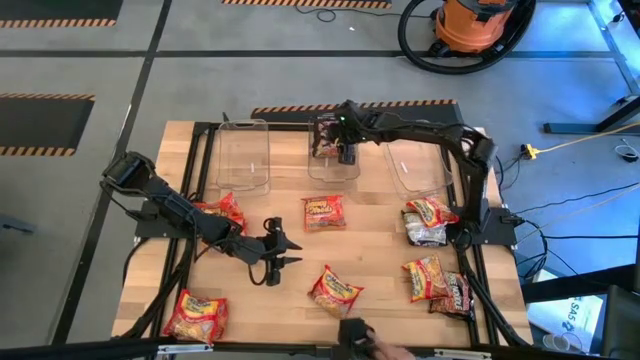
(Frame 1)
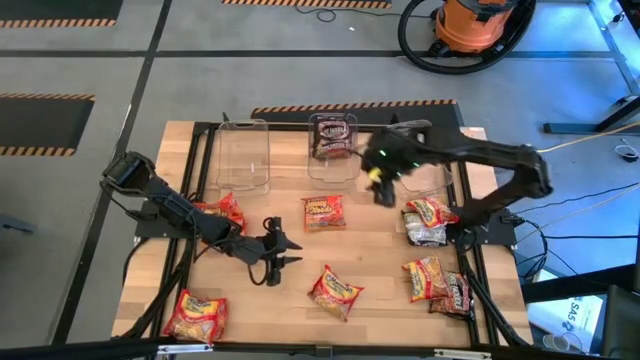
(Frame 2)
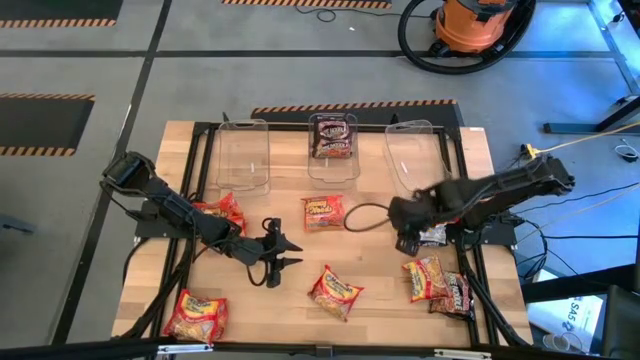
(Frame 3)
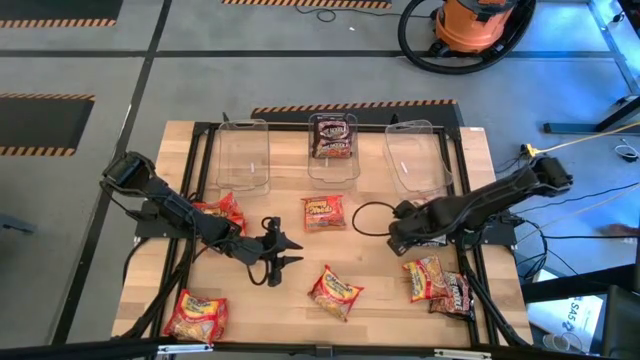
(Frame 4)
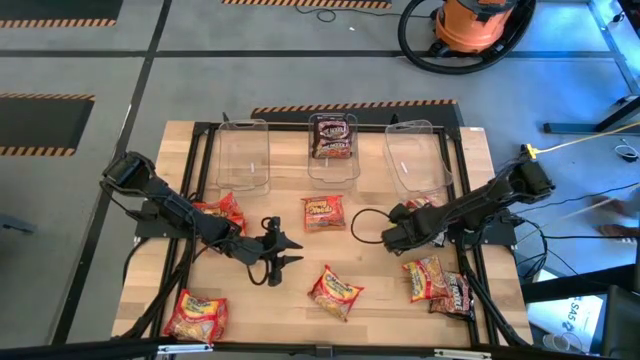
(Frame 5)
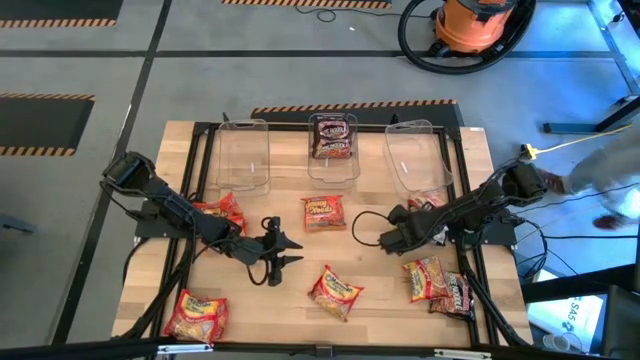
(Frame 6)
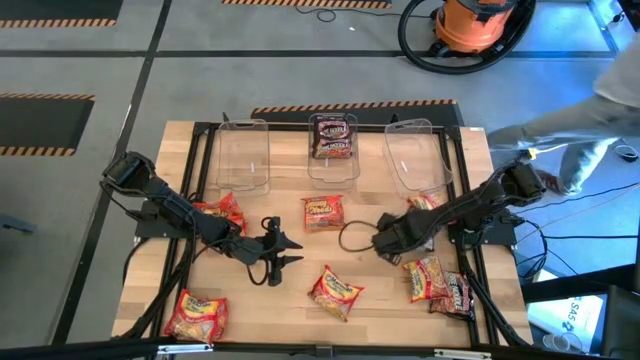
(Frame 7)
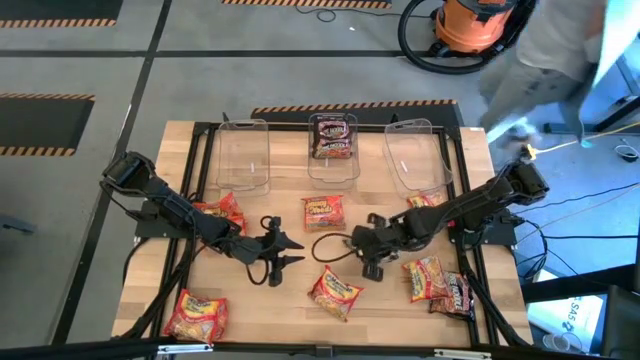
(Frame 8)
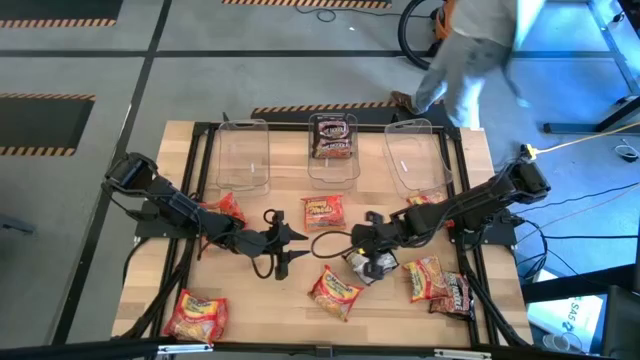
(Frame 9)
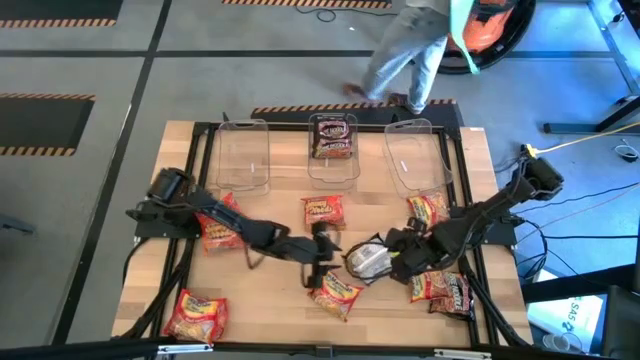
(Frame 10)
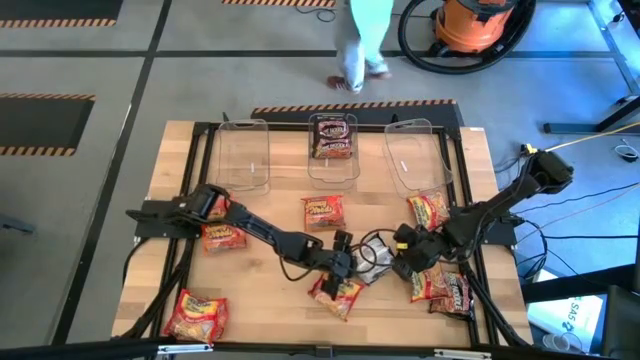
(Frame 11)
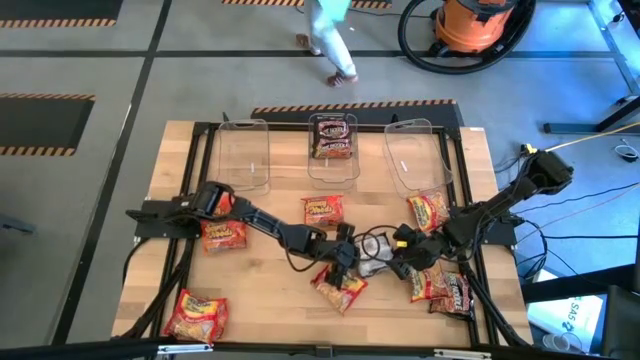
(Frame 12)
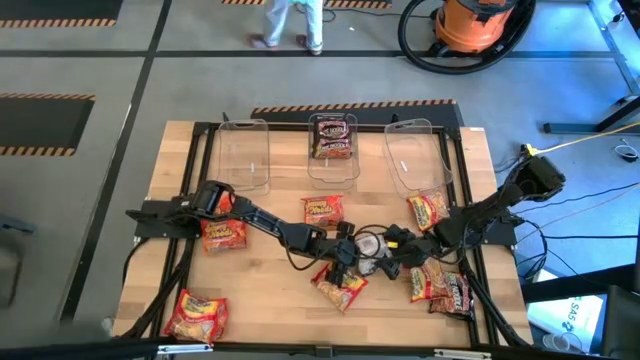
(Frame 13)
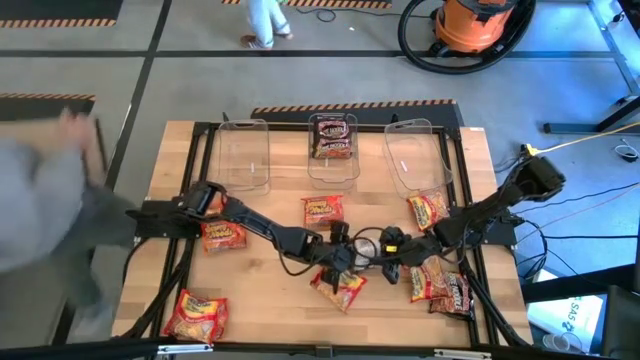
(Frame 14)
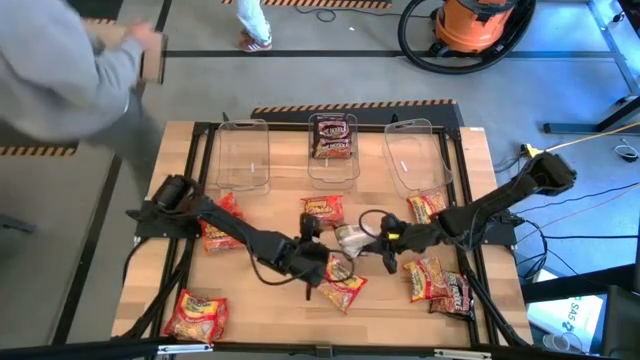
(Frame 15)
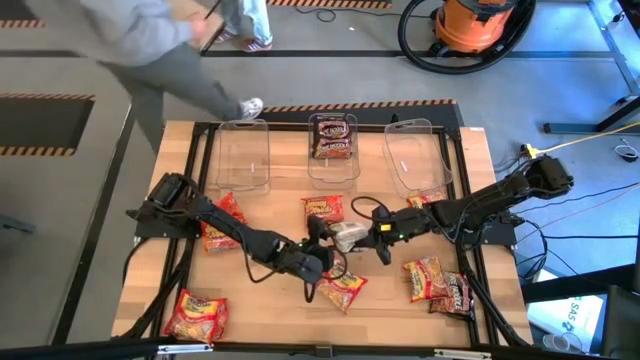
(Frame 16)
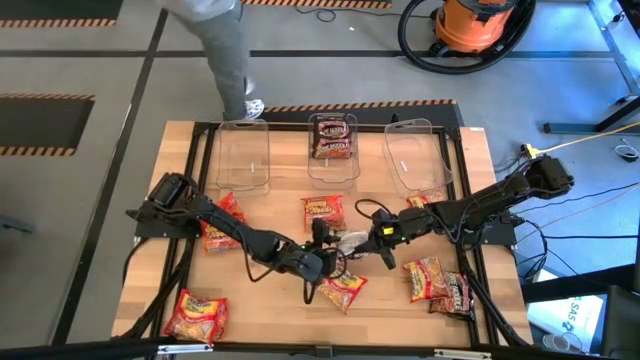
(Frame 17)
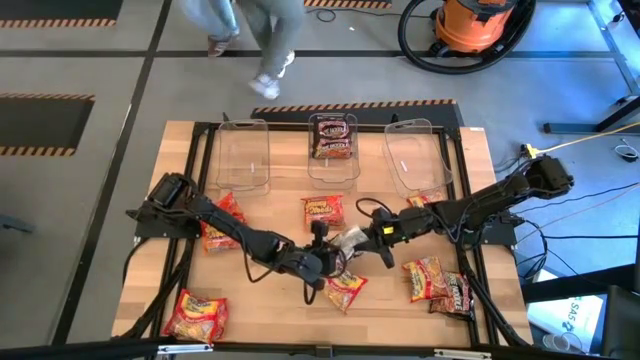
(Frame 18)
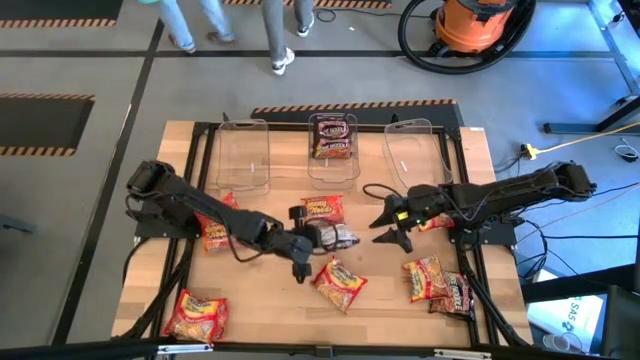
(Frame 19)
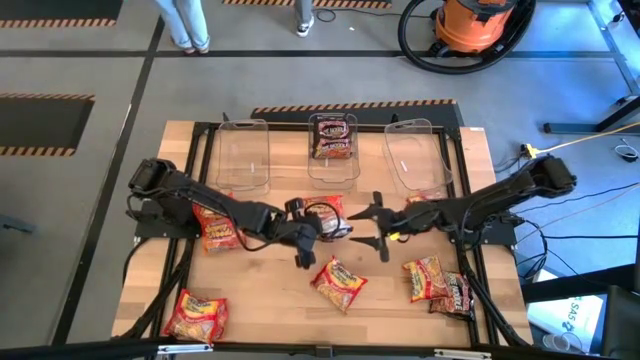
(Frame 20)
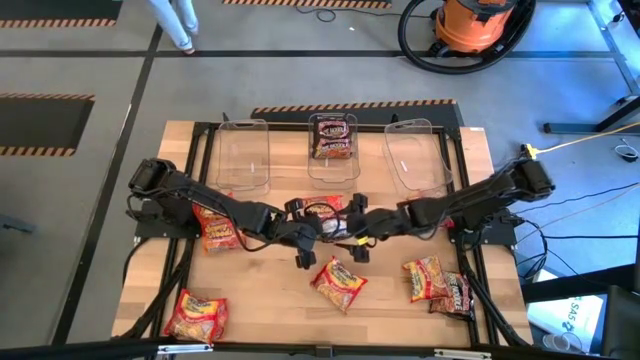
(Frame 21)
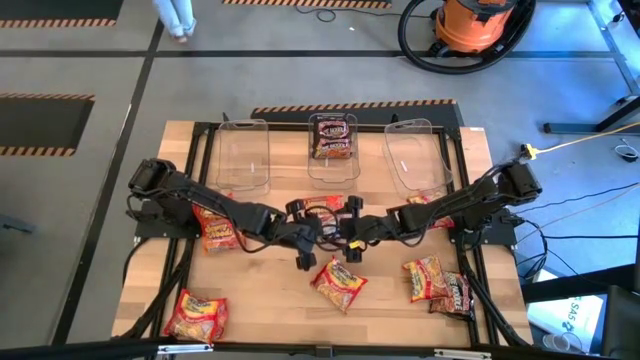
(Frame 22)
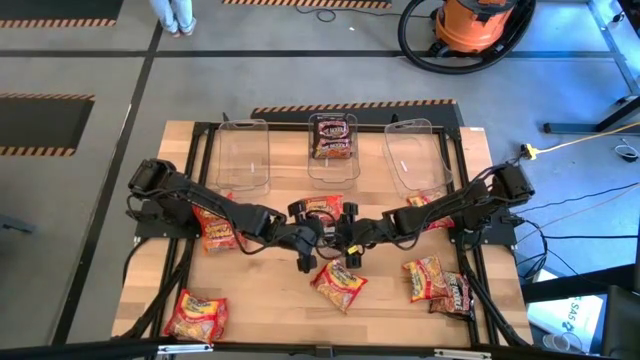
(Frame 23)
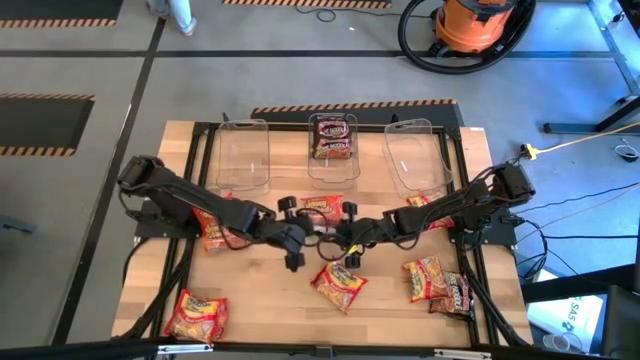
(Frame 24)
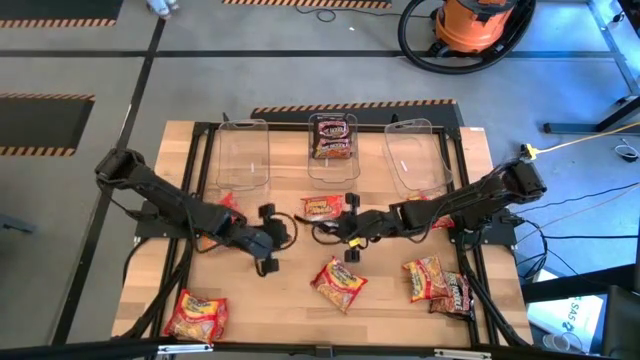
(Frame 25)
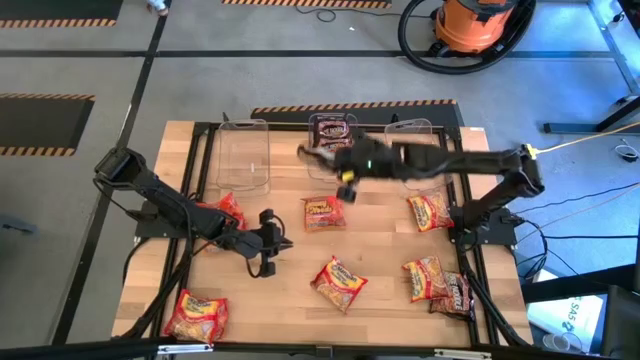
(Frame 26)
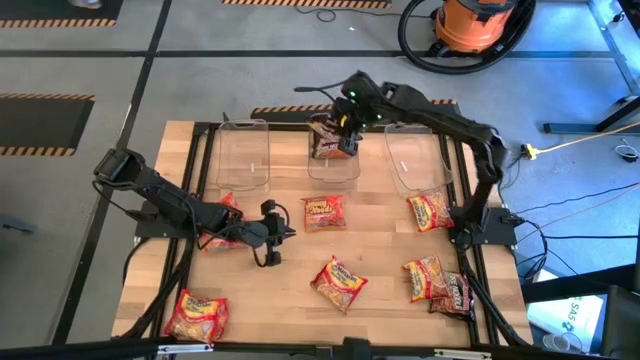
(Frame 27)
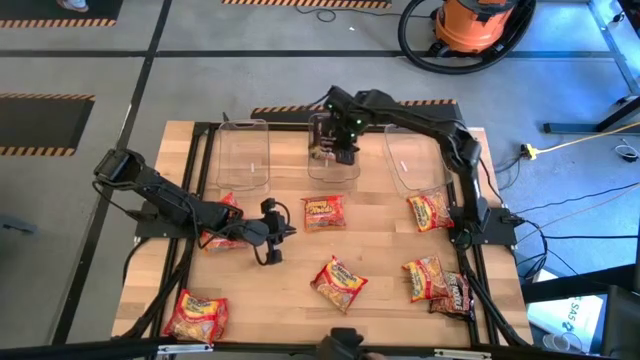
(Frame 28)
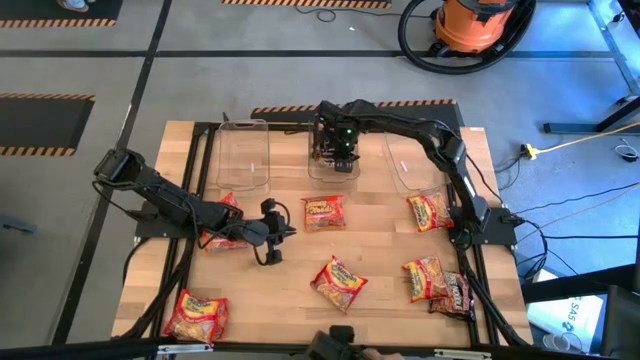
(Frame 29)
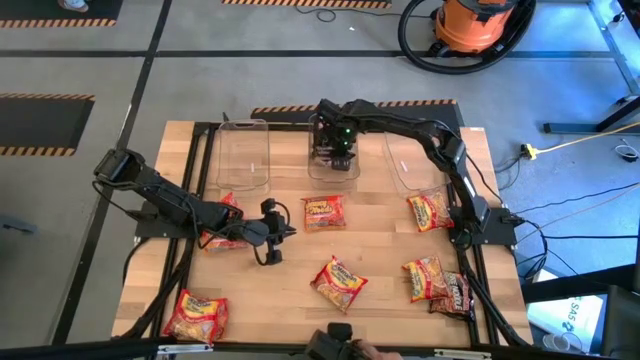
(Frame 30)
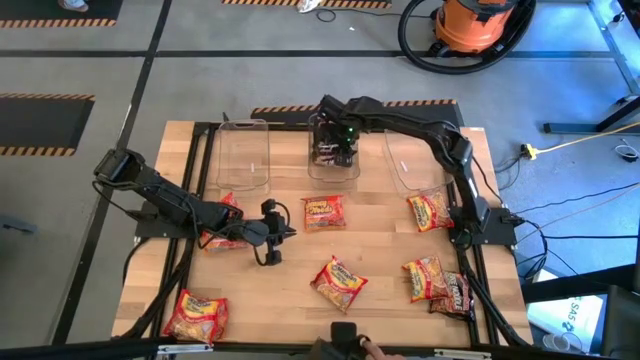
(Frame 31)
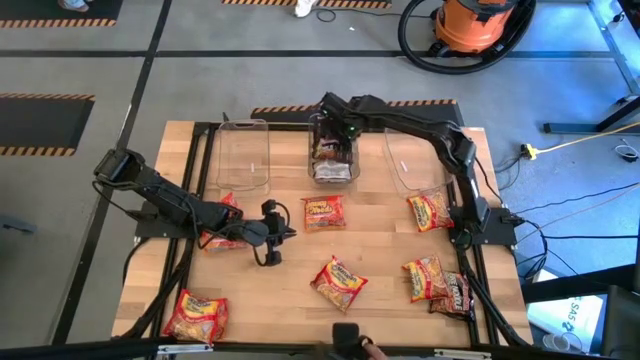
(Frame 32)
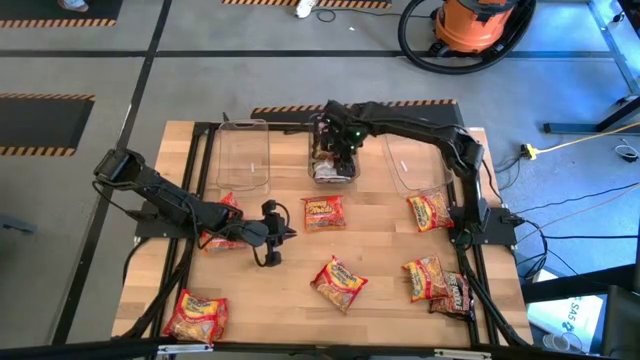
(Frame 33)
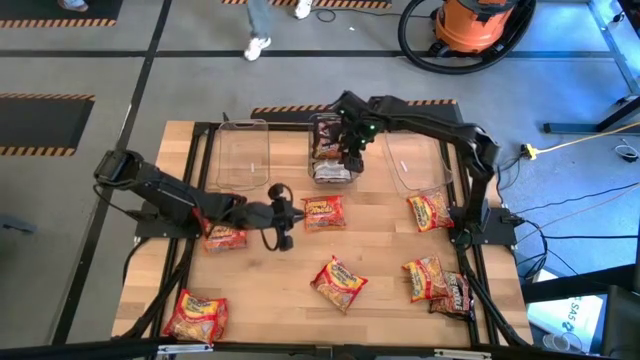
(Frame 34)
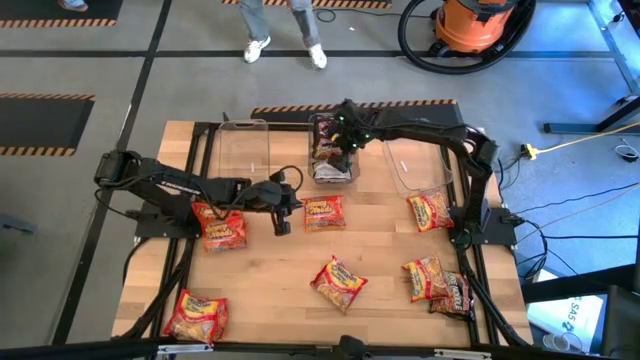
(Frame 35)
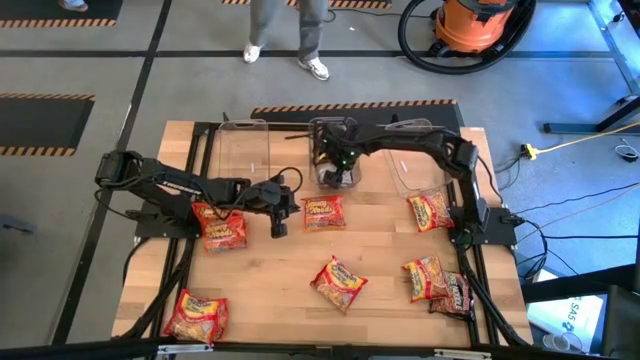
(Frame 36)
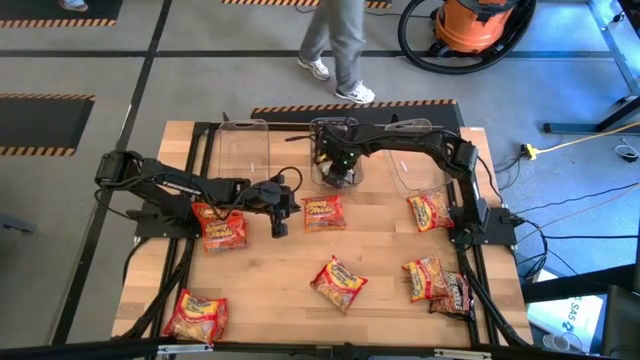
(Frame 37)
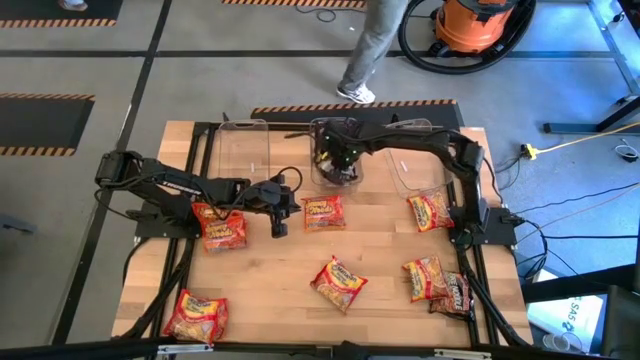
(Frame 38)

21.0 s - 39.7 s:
Task: Sort Maruchan noodles
Put the top black noodle pack into the middle transparent bin

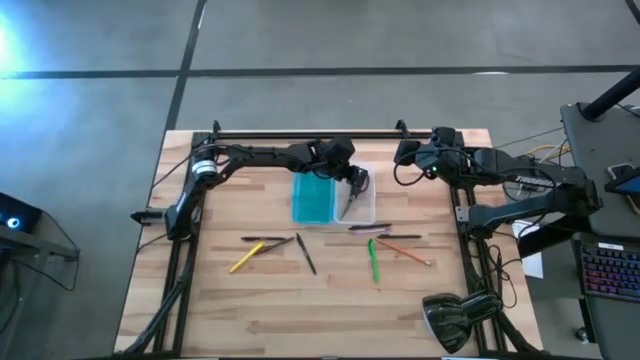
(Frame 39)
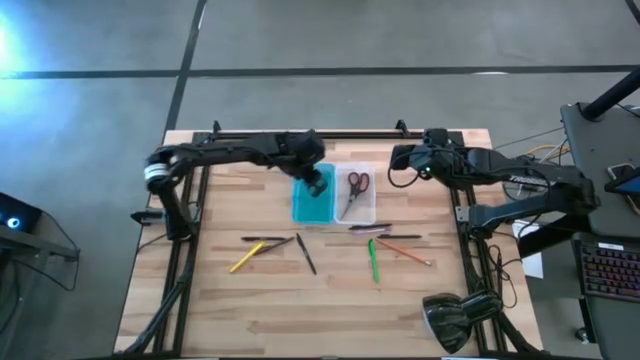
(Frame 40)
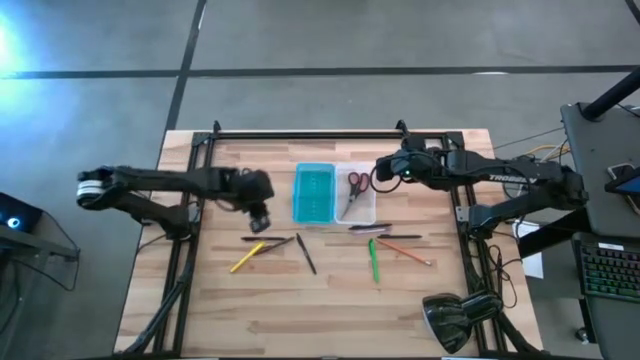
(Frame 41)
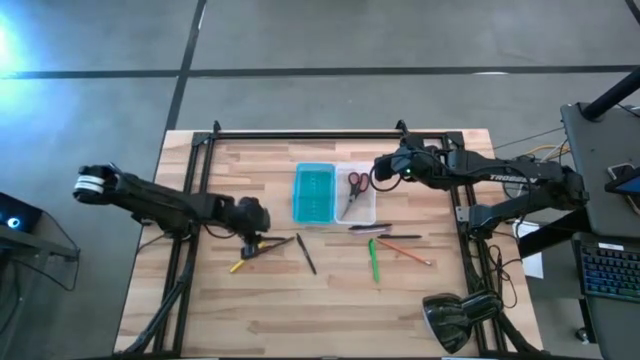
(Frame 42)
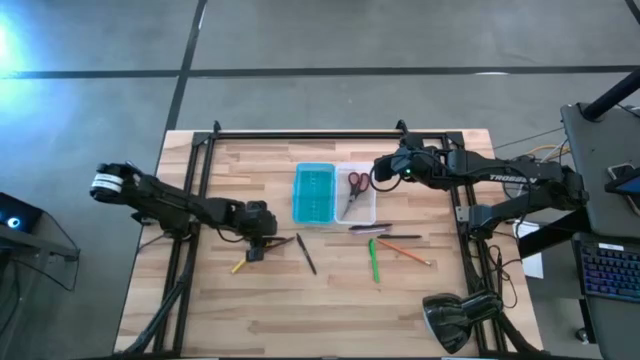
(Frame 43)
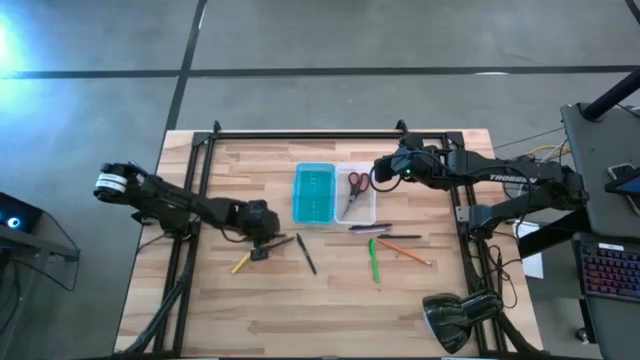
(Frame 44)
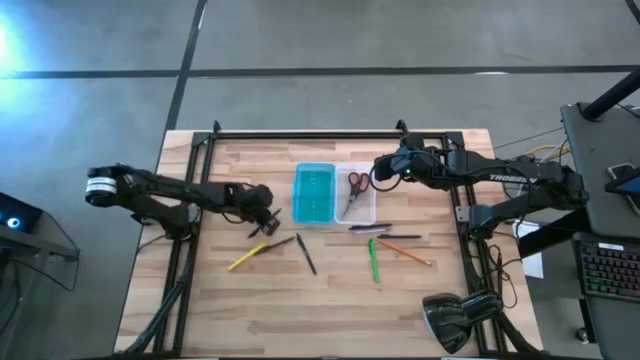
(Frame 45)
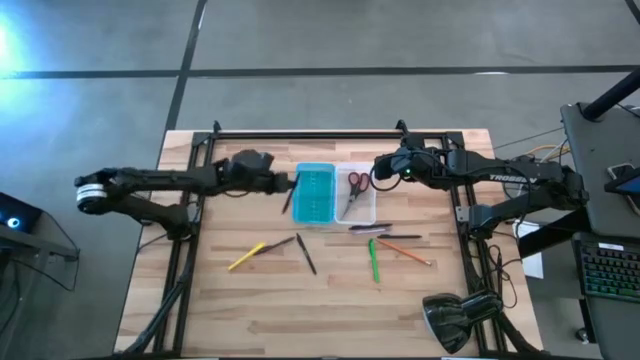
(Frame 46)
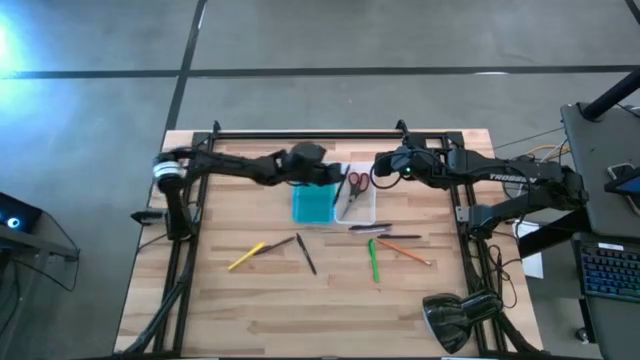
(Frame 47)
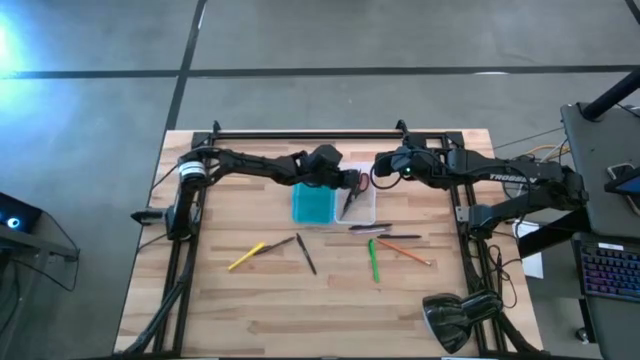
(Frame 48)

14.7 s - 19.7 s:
Task: Pick & place school supplies into a supply box
Put the black pen into the supply box
